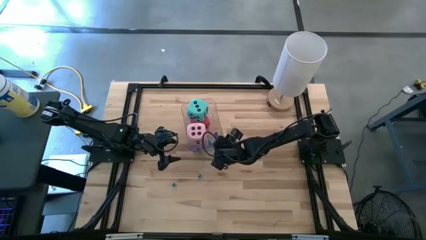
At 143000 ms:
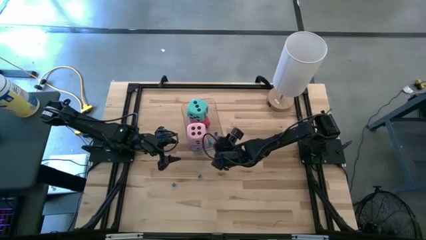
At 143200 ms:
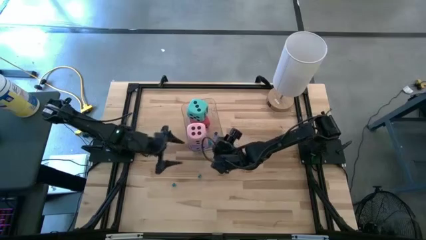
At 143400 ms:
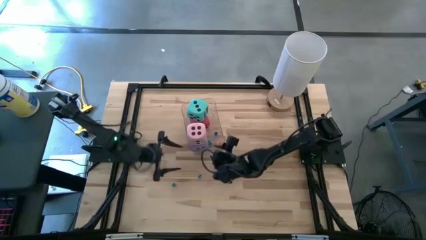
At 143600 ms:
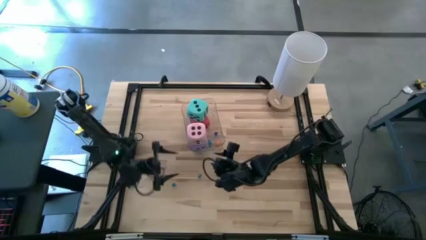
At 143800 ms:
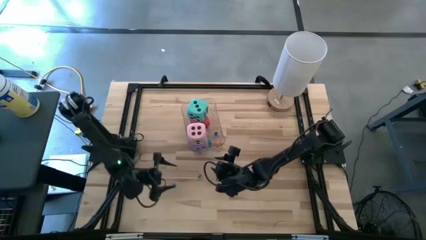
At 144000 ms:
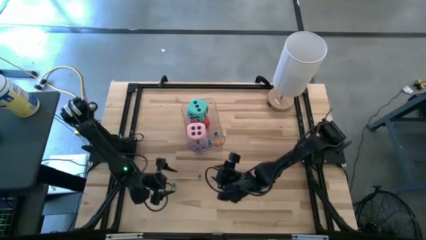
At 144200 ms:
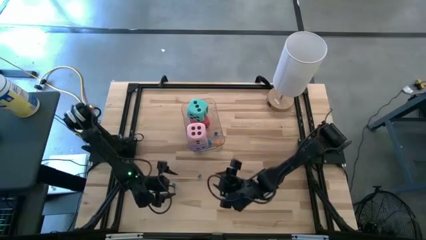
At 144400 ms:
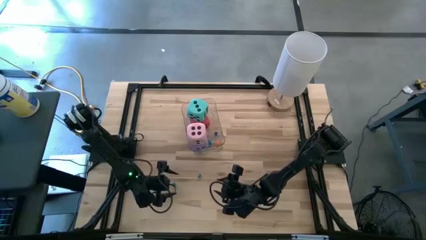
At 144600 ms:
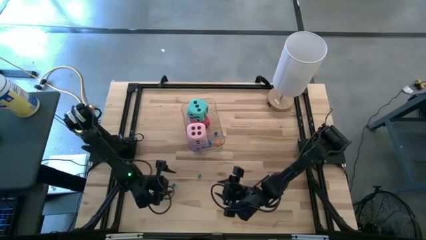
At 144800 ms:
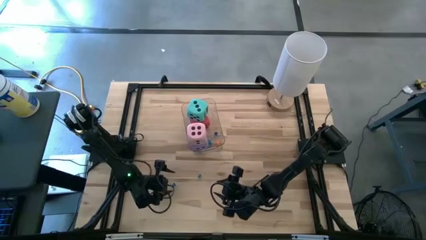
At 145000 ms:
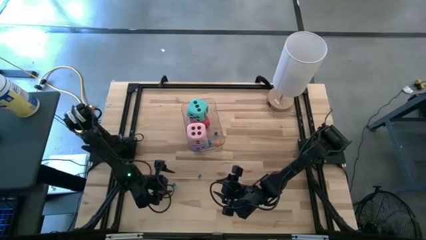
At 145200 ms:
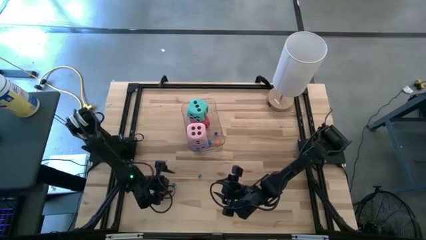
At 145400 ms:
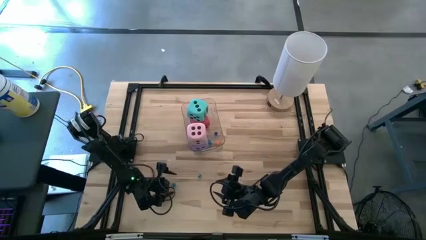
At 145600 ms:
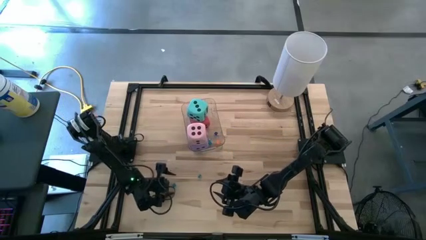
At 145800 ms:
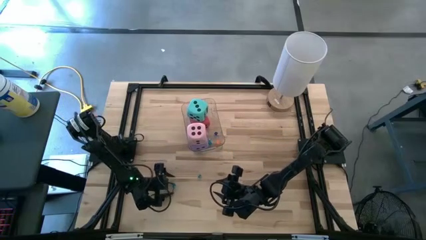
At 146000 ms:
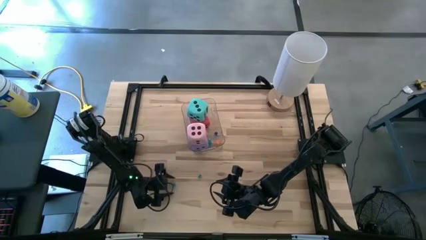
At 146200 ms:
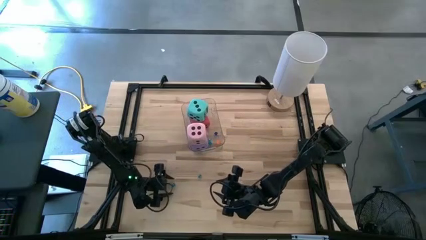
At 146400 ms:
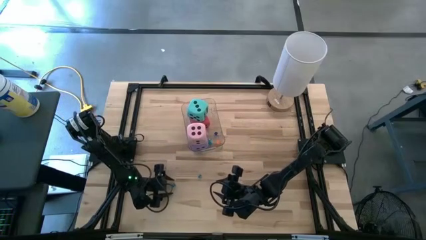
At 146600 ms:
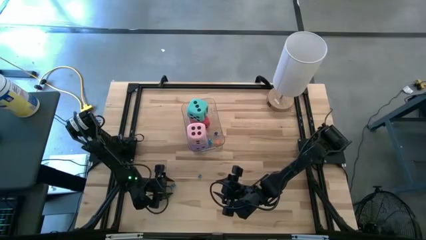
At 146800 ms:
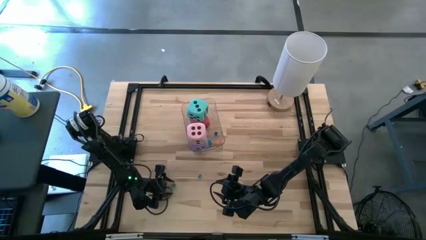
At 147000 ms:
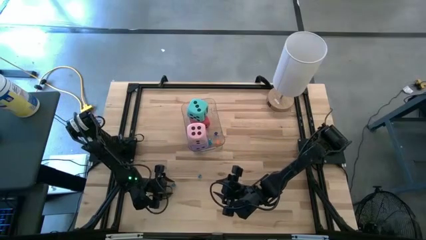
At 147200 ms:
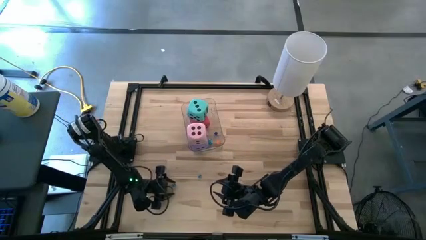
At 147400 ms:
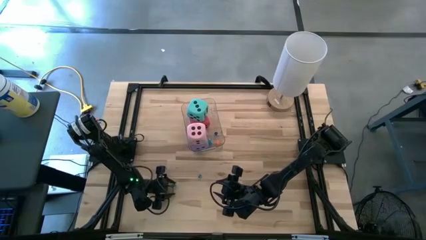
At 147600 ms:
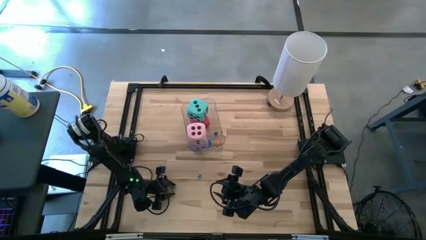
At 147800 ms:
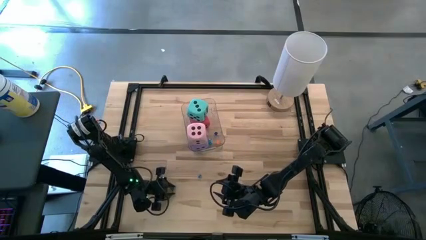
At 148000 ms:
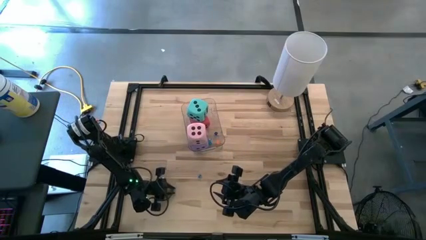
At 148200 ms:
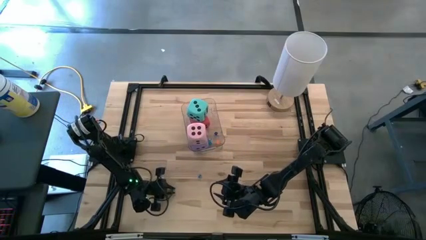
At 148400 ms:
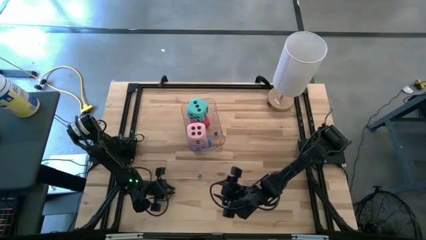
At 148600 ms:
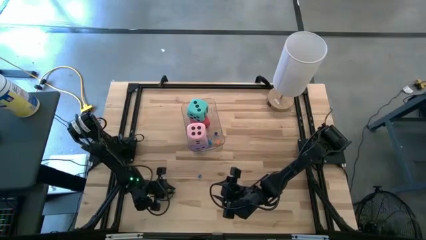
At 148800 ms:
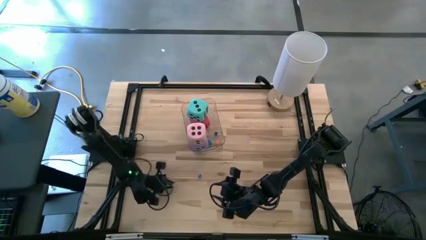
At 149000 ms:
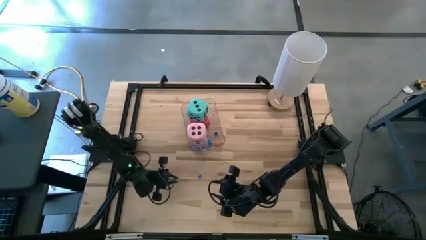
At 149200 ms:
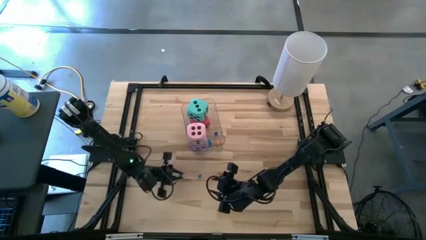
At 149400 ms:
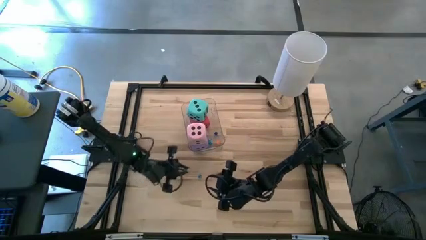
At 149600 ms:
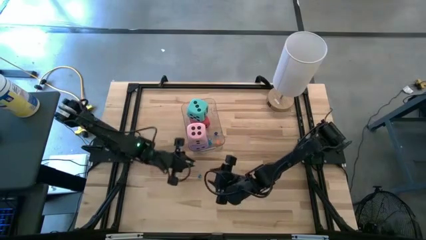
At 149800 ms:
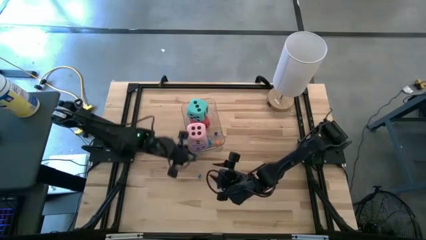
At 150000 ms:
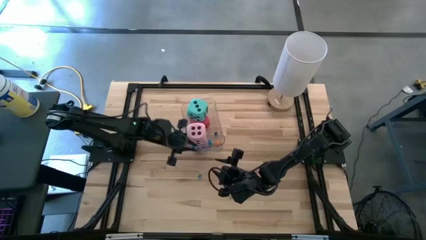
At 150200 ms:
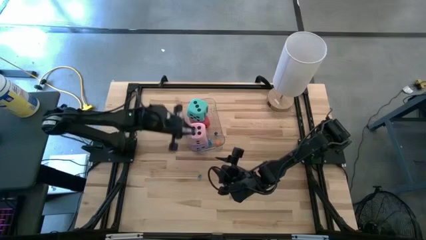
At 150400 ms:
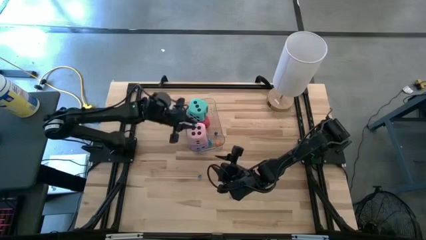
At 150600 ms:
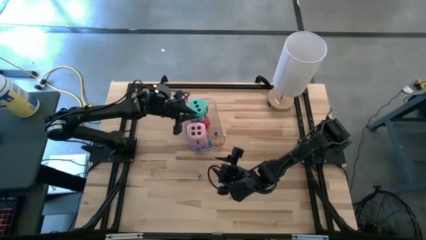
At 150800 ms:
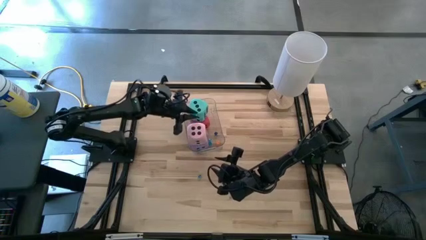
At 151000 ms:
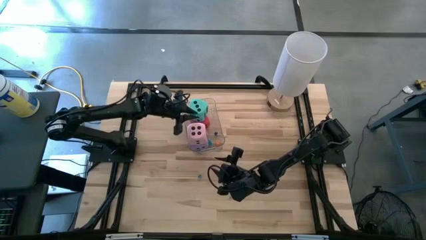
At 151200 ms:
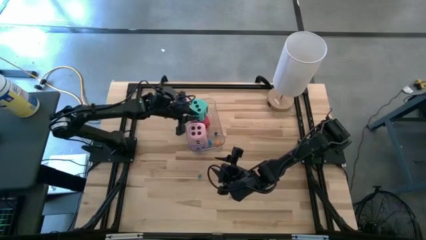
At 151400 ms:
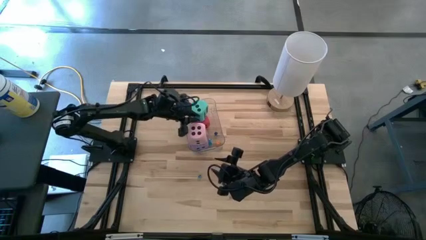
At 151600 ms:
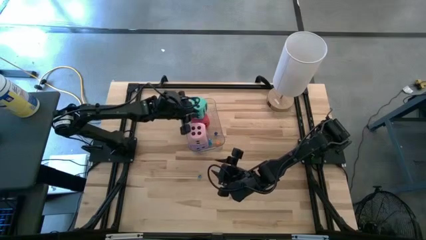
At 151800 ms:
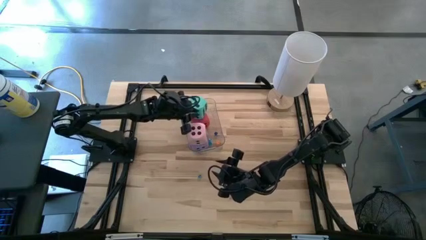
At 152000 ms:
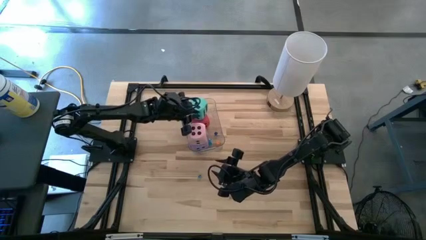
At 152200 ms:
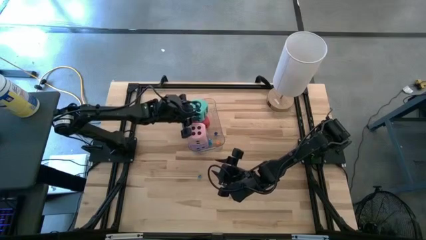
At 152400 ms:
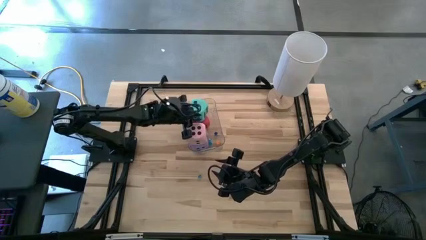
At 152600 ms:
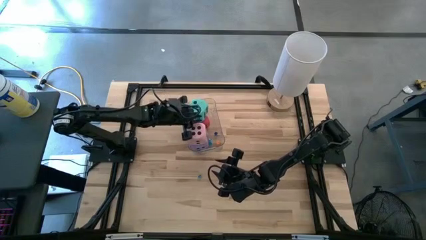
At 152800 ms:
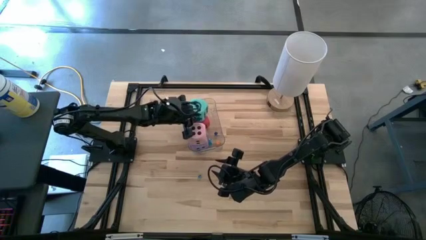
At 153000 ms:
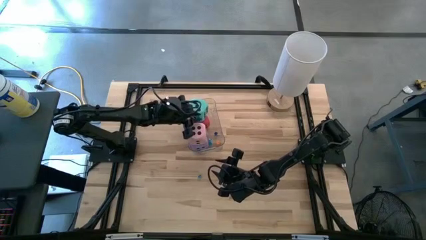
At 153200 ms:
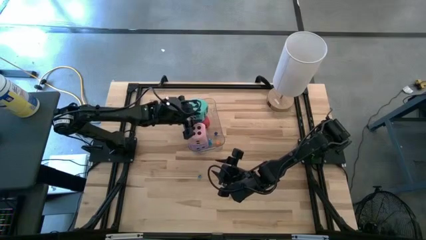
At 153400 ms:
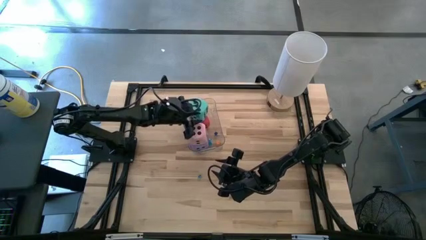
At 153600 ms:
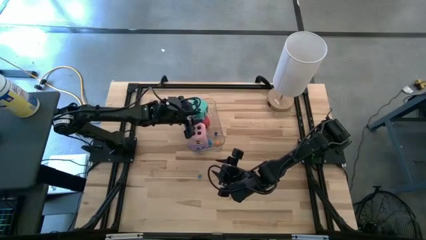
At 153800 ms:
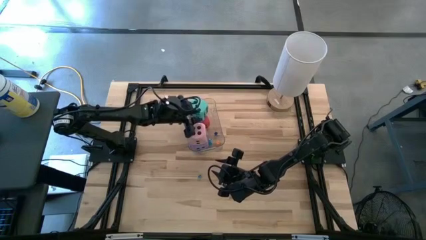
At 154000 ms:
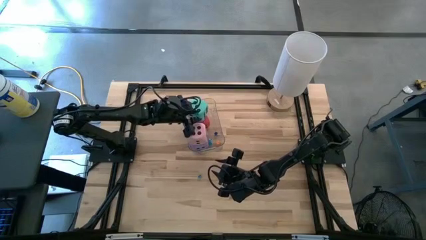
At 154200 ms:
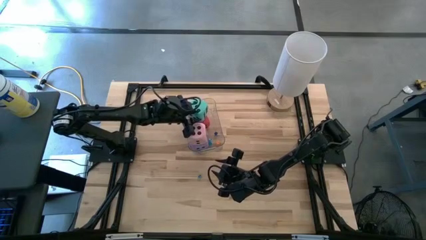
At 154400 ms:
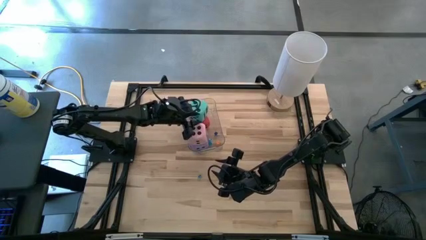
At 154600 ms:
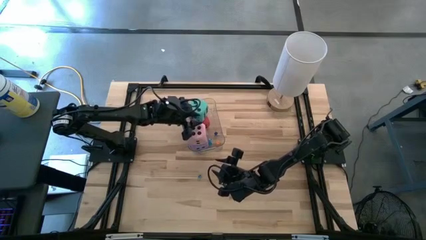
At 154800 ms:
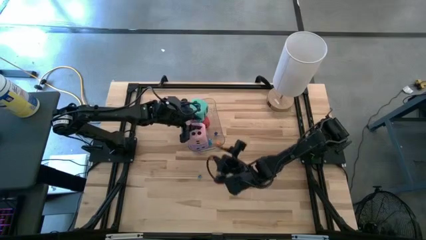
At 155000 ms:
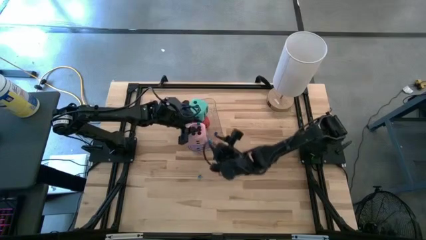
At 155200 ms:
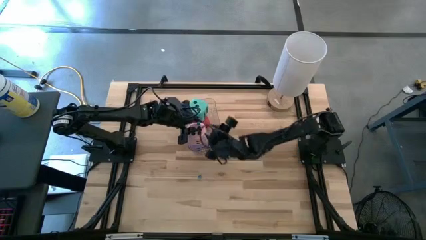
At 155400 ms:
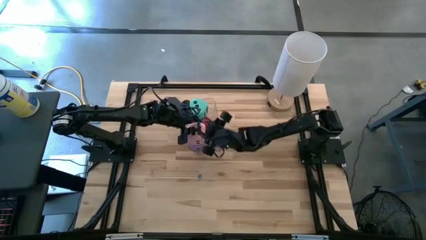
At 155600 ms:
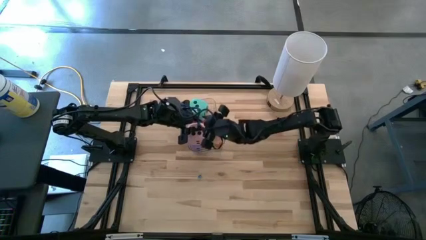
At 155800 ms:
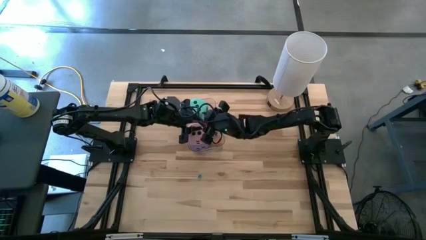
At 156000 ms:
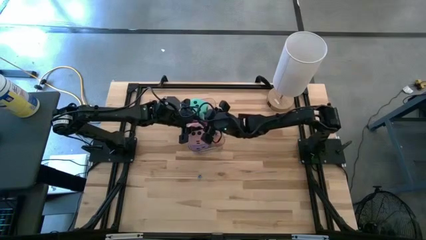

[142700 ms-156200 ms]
Task: Pick & Place Dice
Put the small light blue die into the transparent bin
